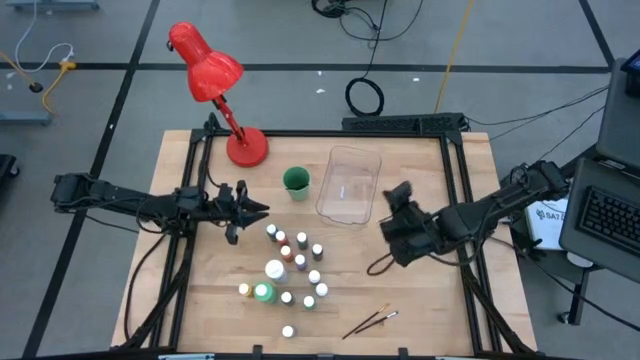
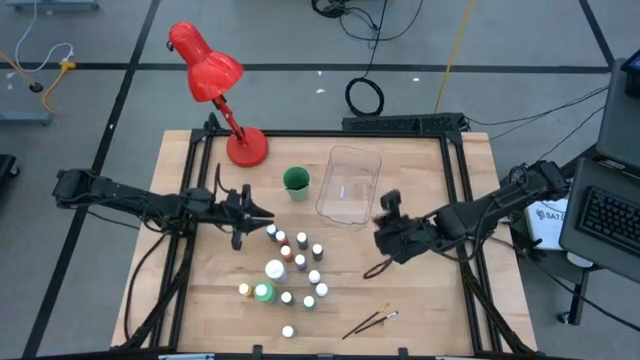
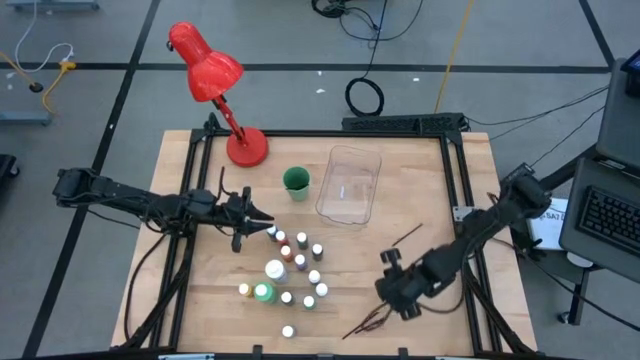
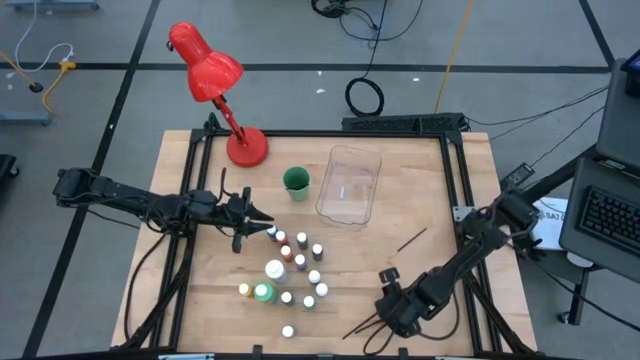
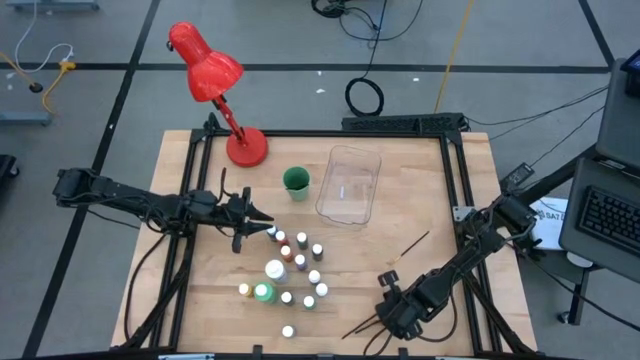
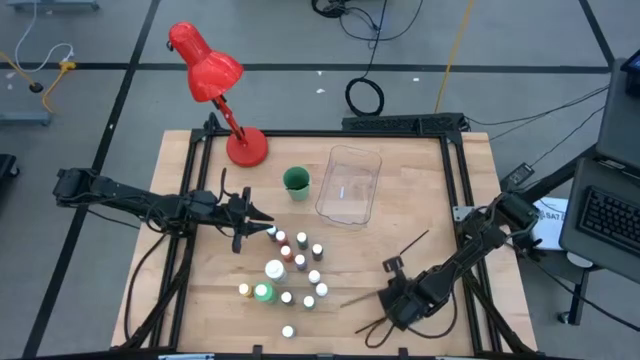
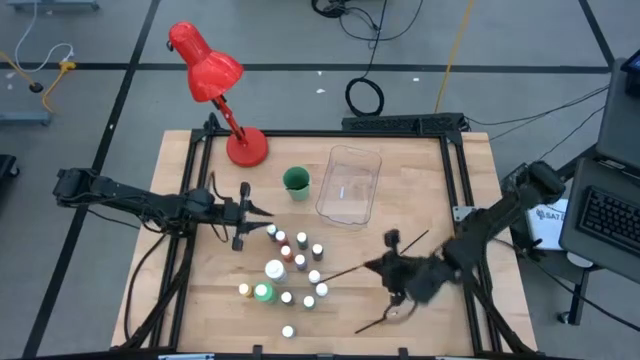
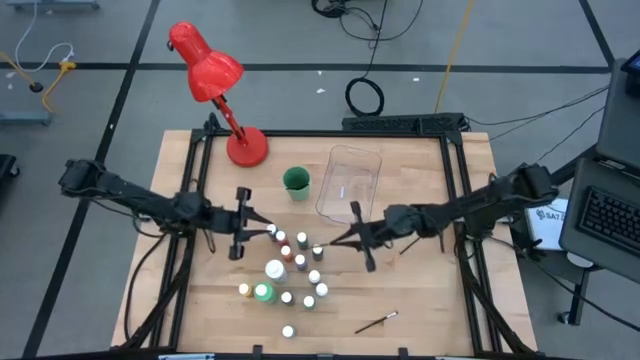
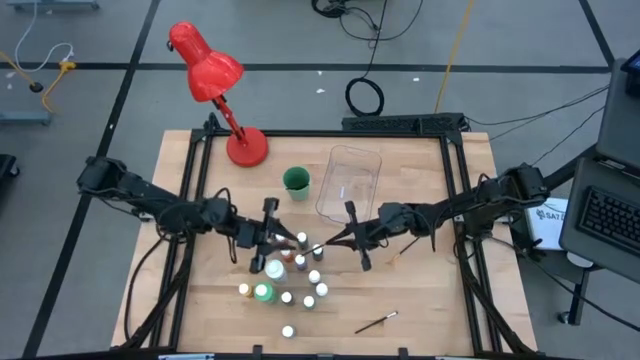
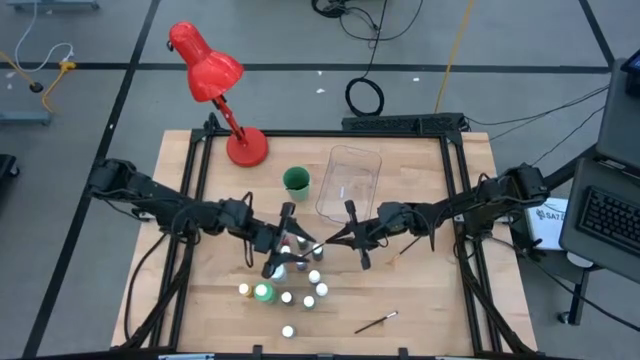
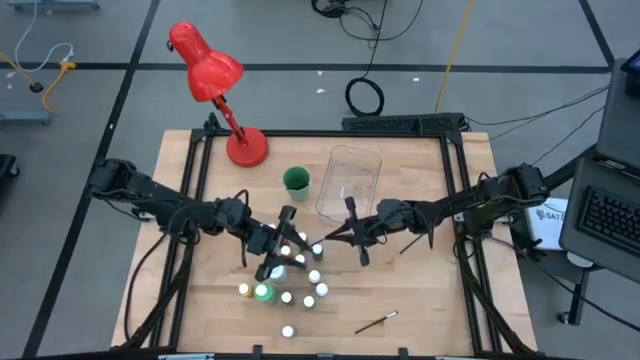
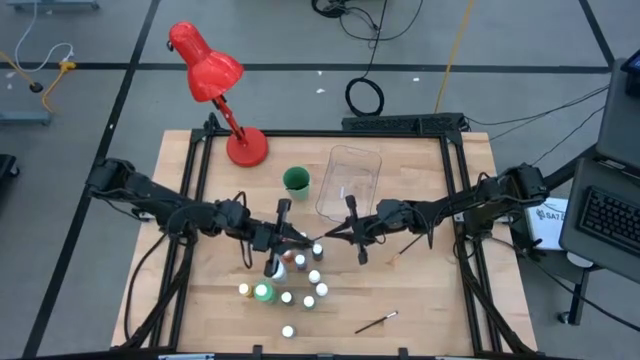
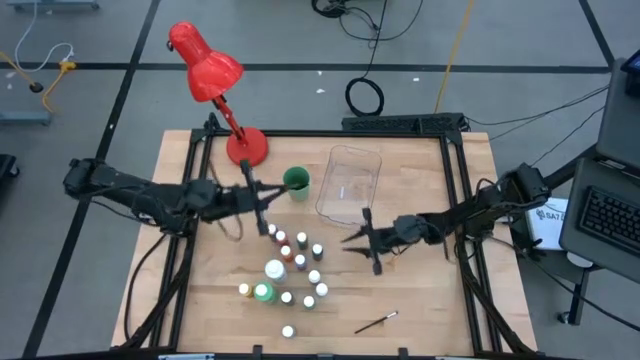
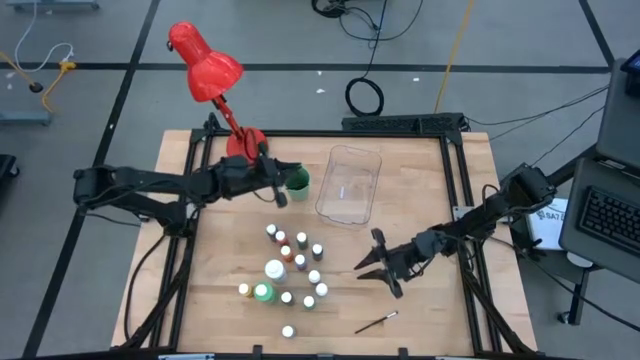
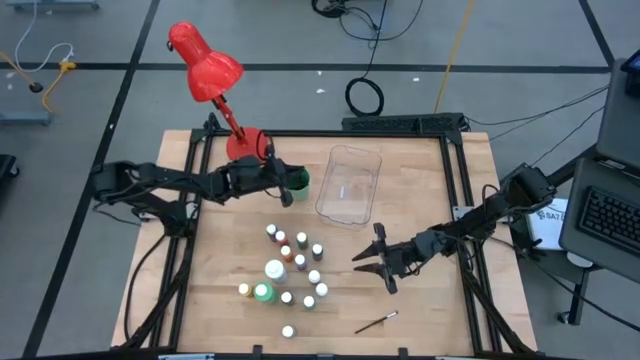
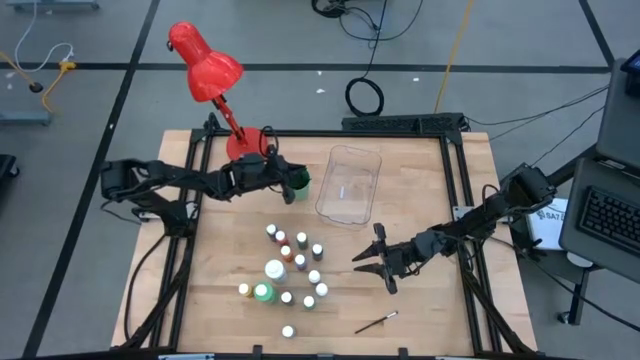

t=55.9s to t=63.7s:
Task: Pick & Place Paint Supplies
Put the orange paint brush into the green cup

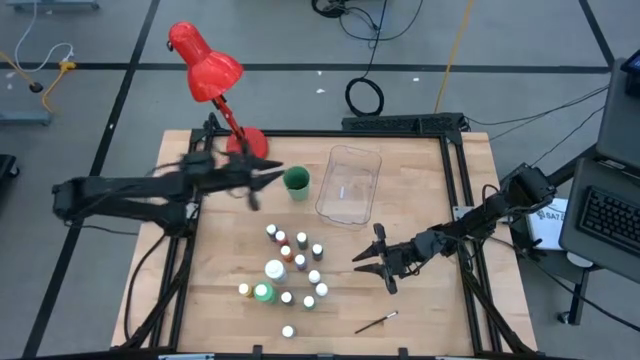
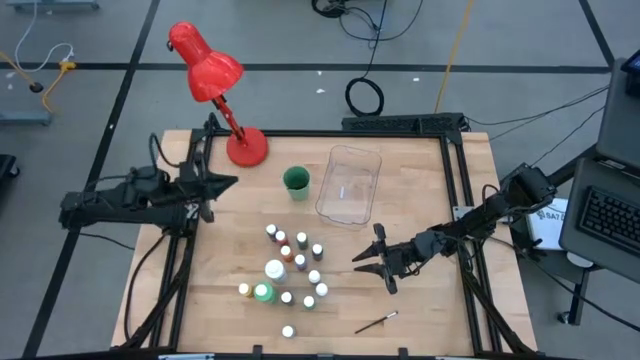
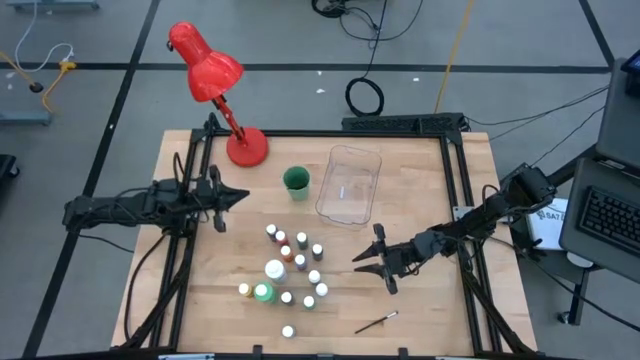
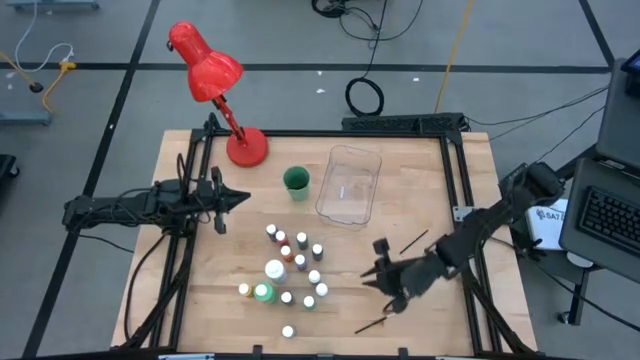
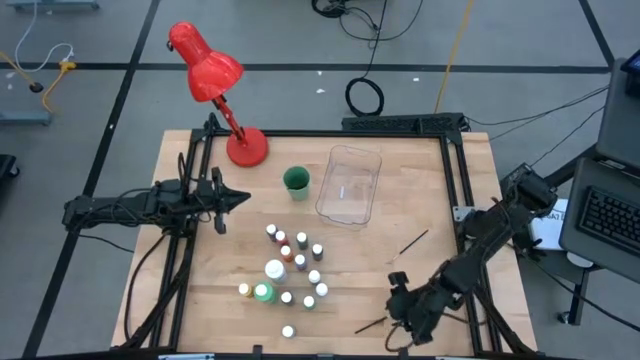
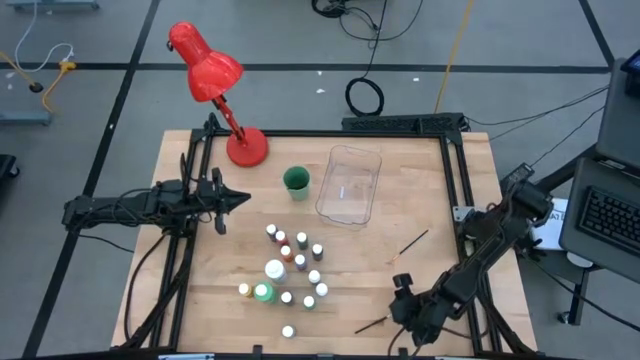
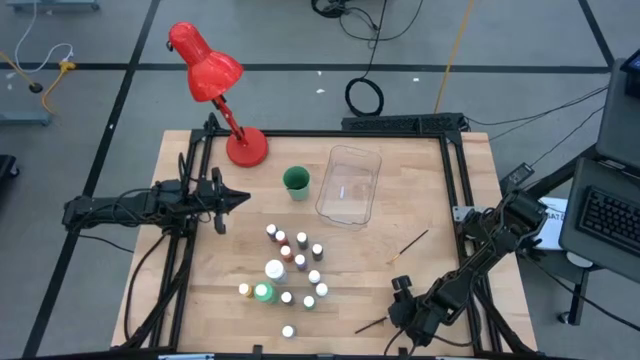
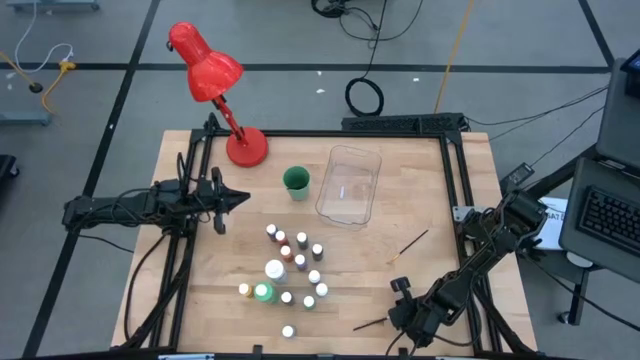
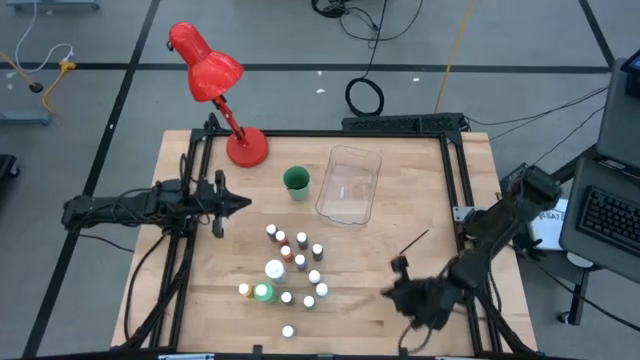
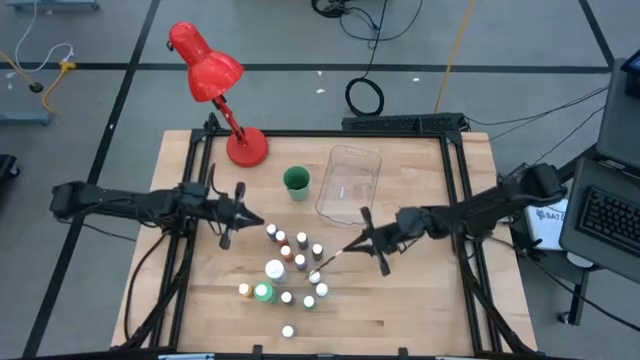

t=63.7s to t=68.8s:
Put the black paint brush into the green cup

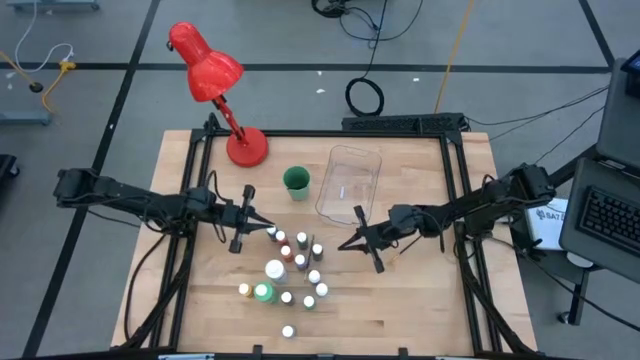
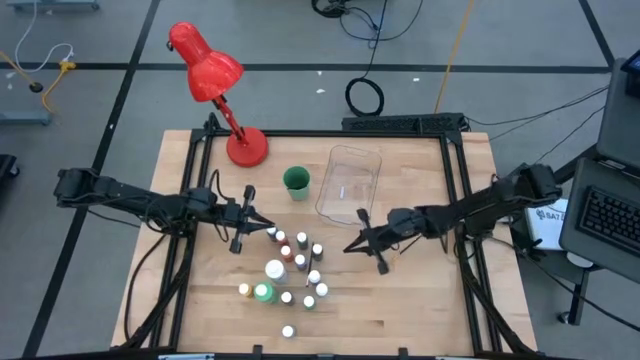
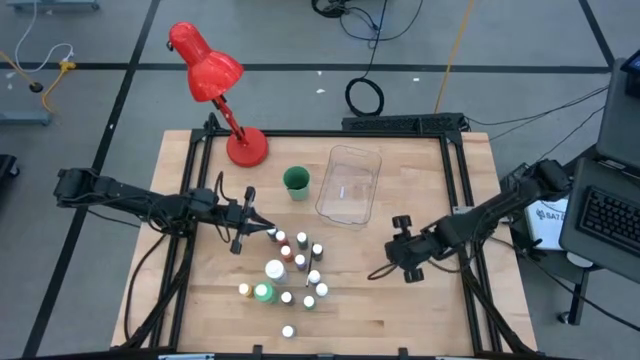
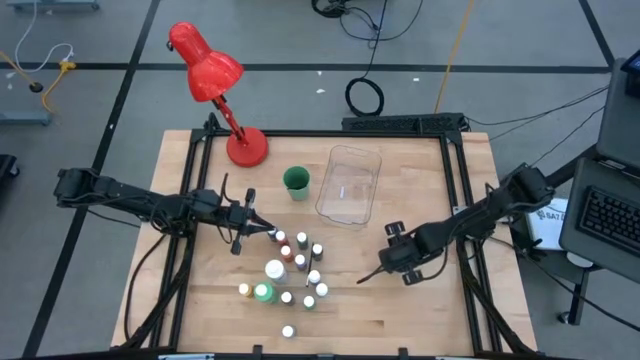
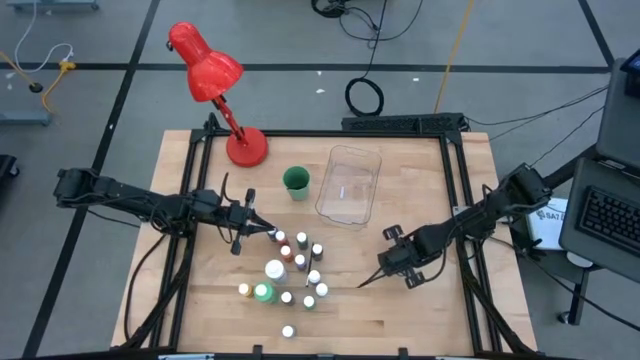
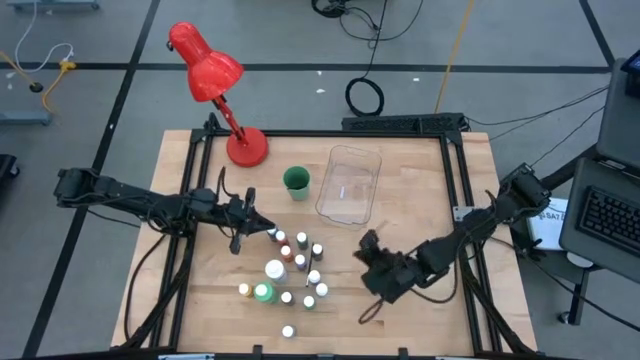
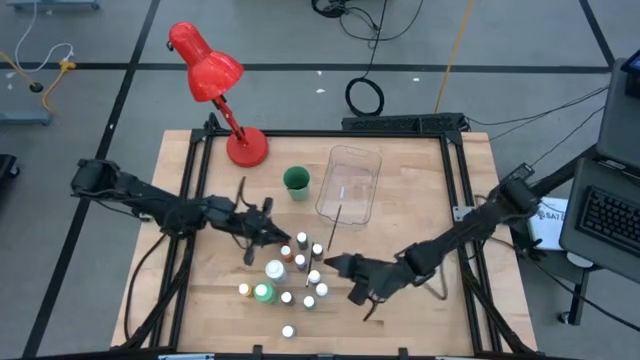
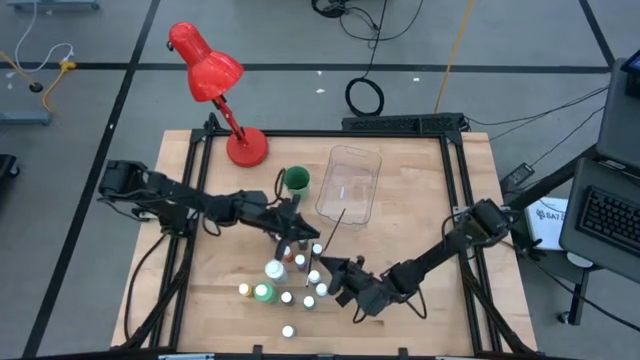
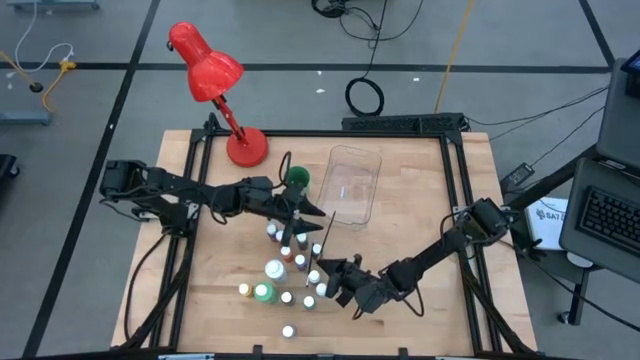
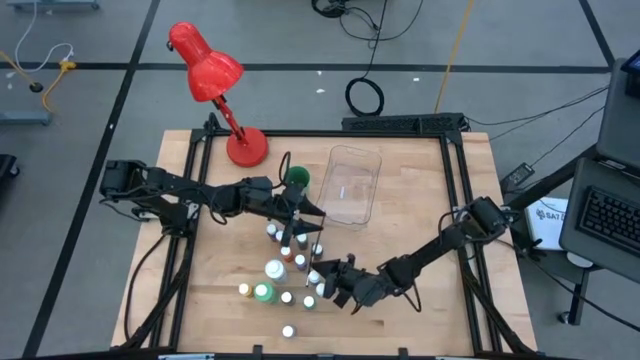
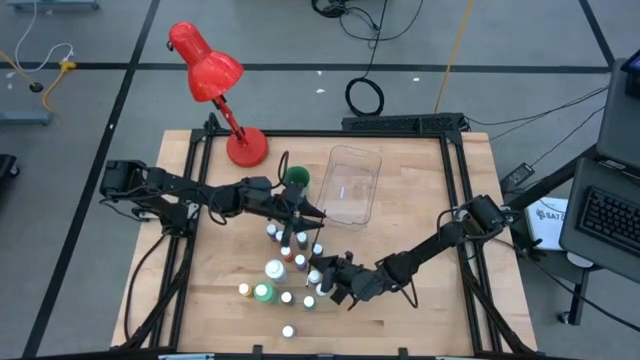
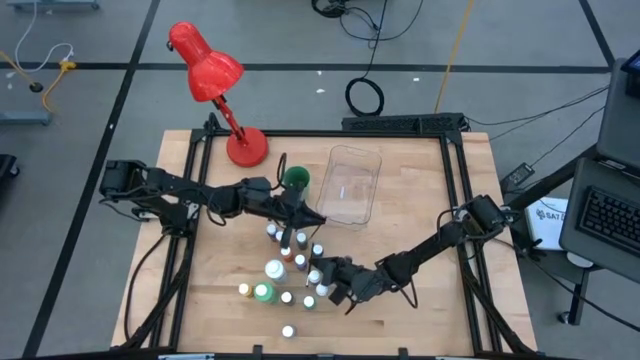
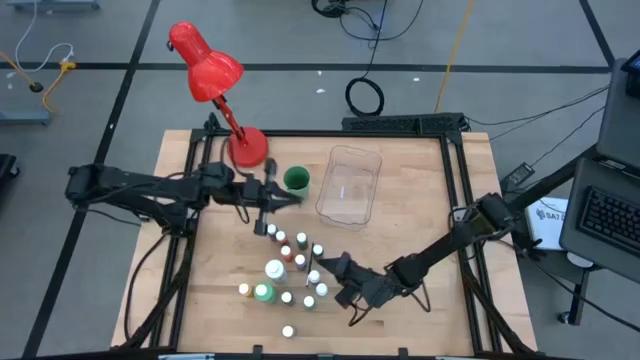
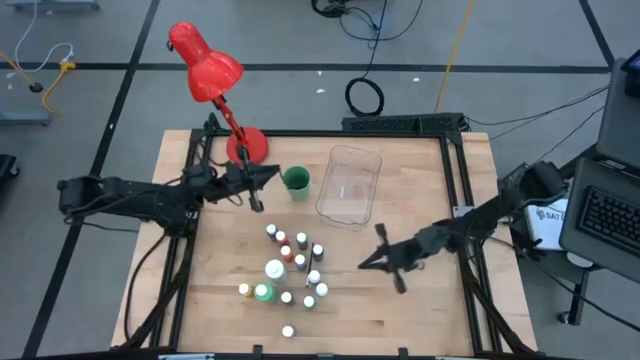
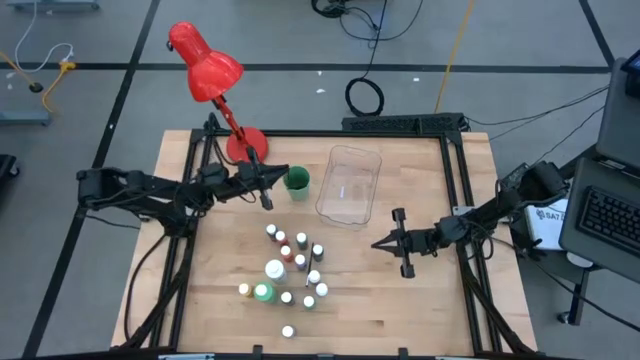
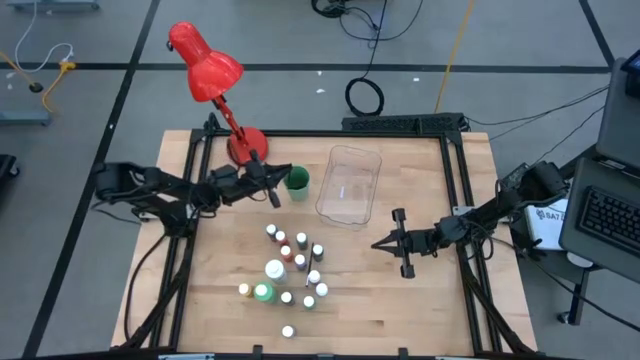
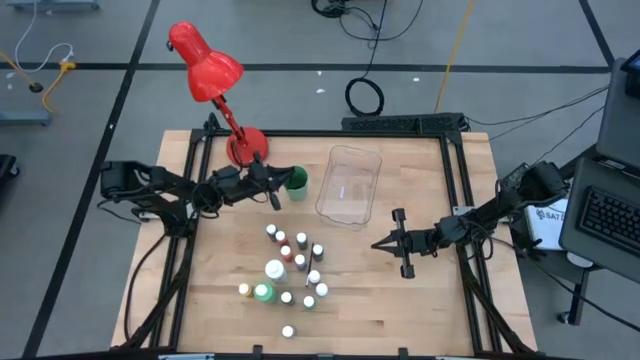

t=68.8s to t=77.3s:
Put the black paint brush into the green cup
